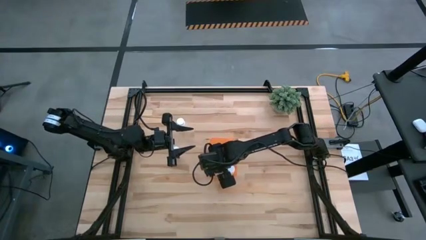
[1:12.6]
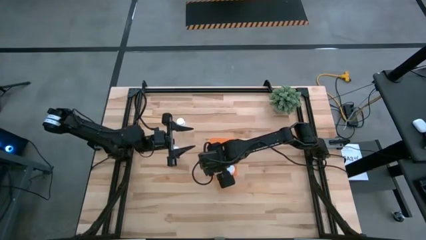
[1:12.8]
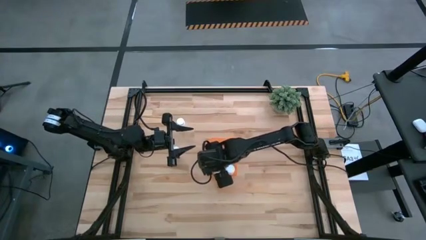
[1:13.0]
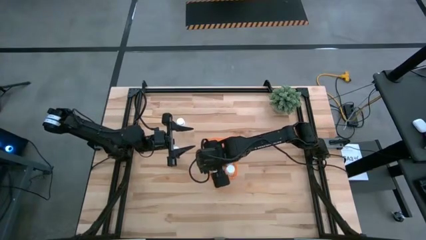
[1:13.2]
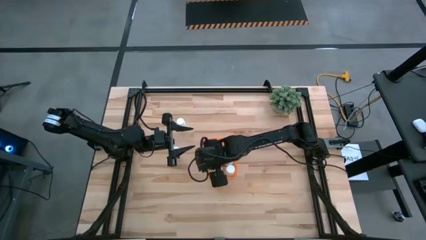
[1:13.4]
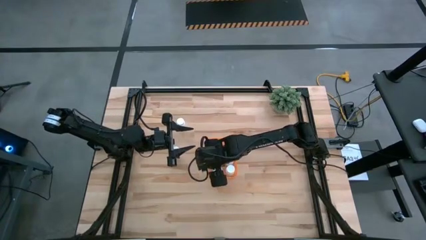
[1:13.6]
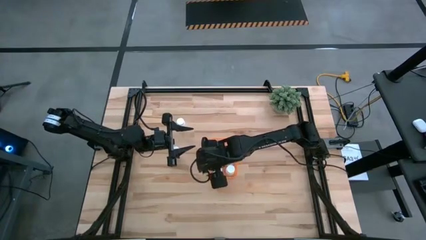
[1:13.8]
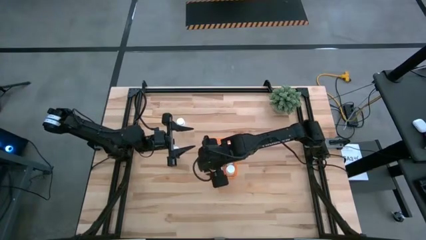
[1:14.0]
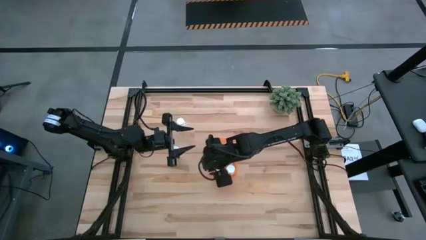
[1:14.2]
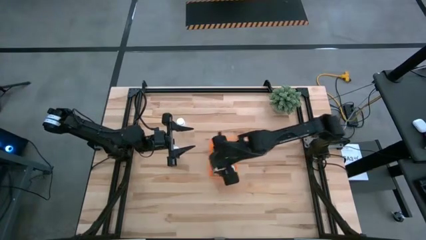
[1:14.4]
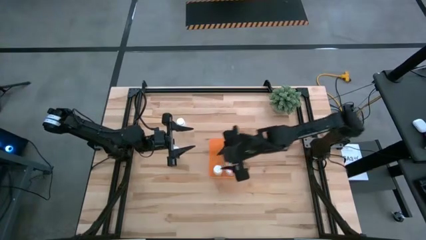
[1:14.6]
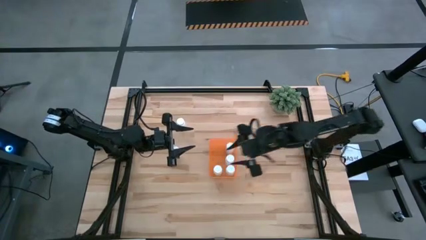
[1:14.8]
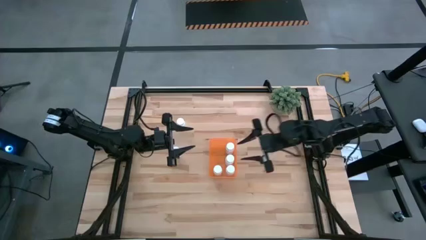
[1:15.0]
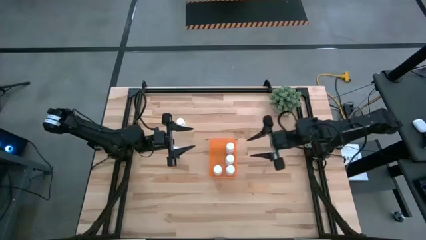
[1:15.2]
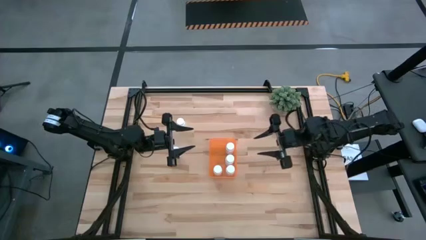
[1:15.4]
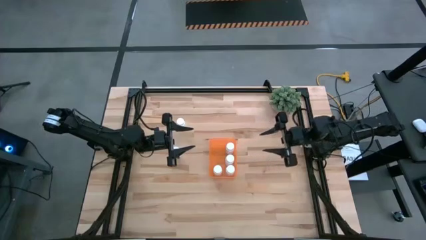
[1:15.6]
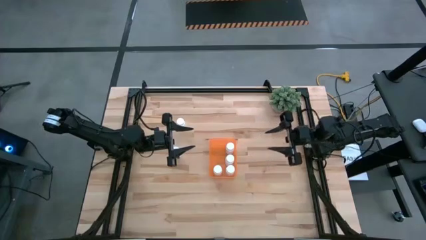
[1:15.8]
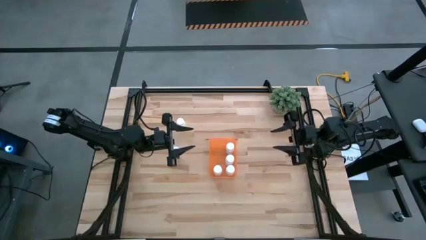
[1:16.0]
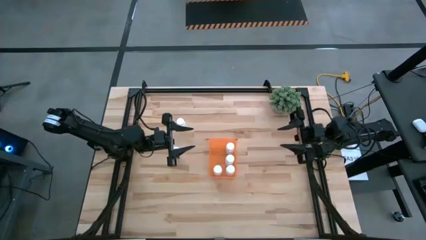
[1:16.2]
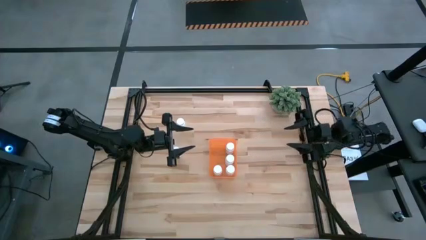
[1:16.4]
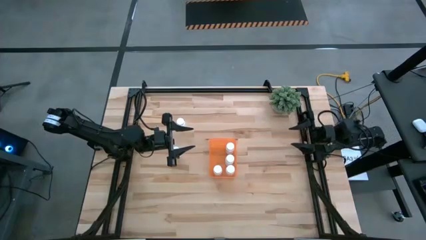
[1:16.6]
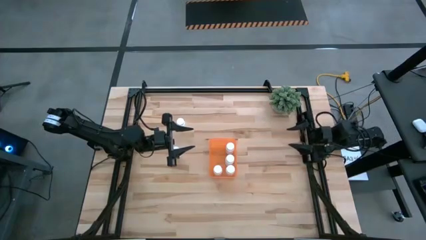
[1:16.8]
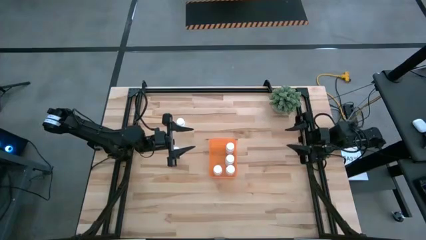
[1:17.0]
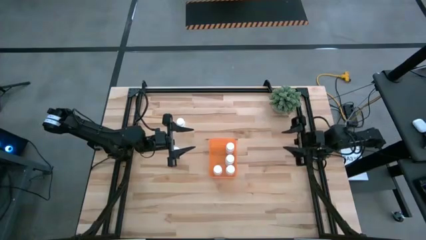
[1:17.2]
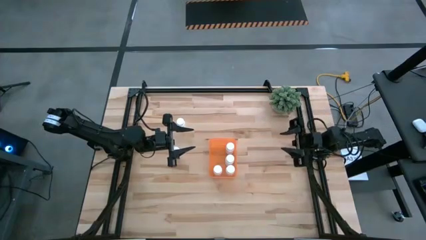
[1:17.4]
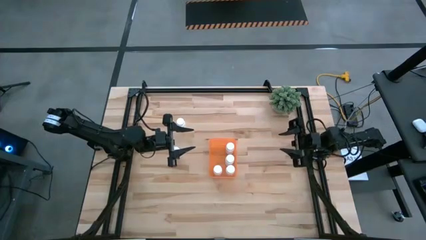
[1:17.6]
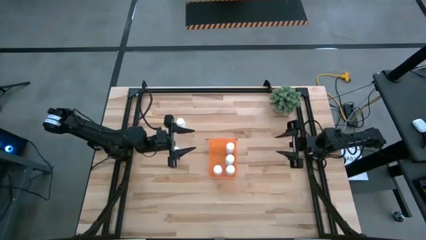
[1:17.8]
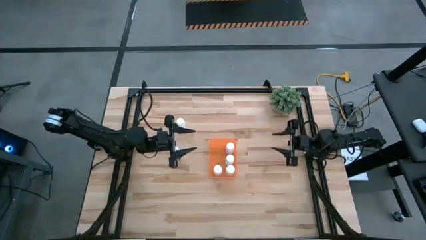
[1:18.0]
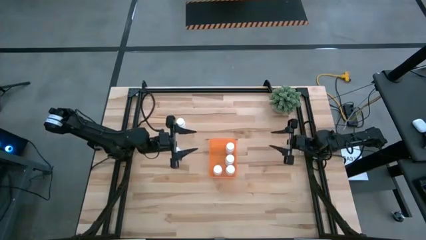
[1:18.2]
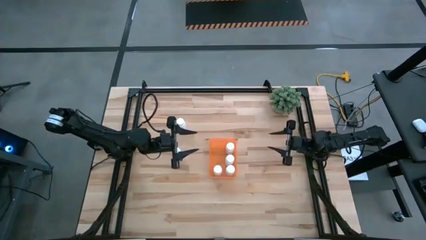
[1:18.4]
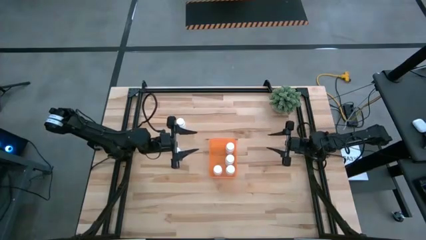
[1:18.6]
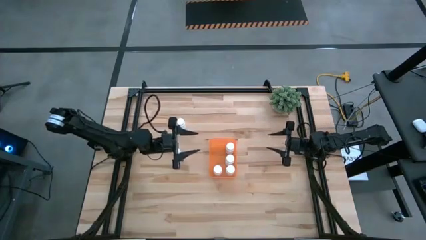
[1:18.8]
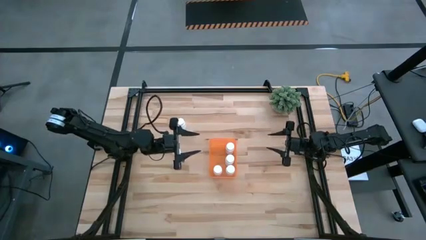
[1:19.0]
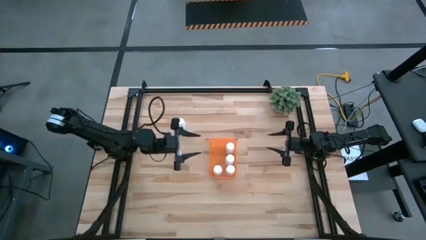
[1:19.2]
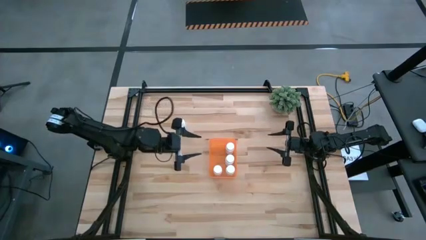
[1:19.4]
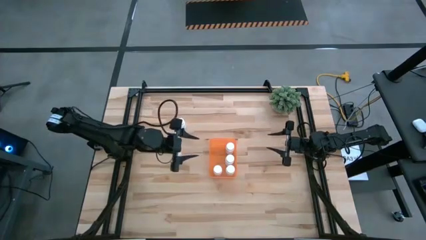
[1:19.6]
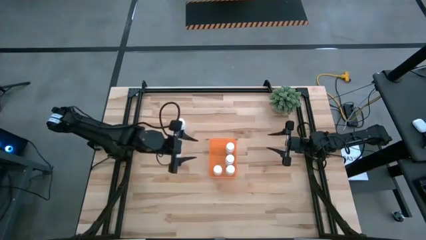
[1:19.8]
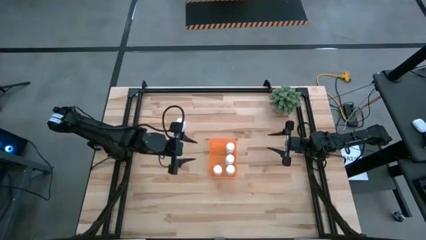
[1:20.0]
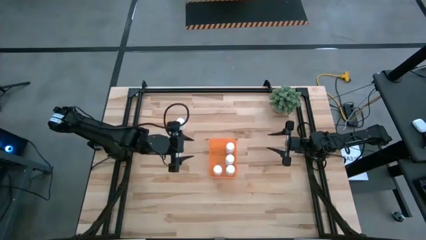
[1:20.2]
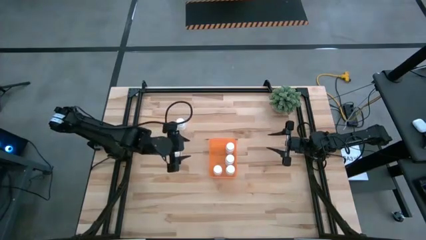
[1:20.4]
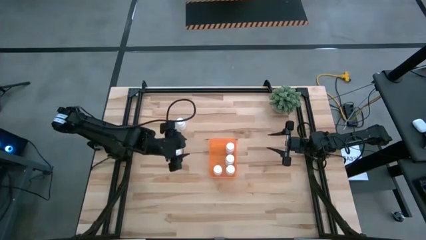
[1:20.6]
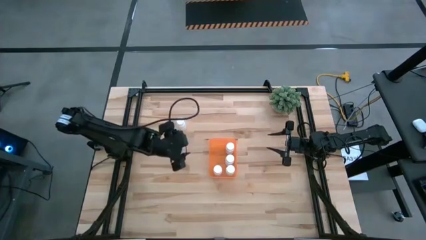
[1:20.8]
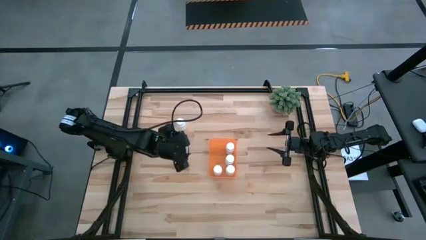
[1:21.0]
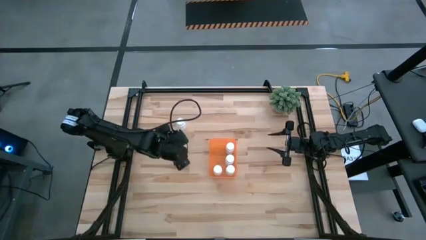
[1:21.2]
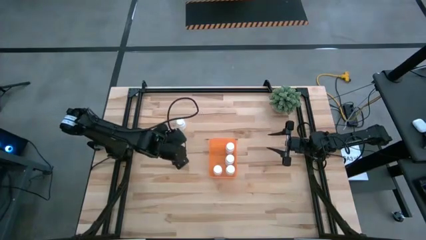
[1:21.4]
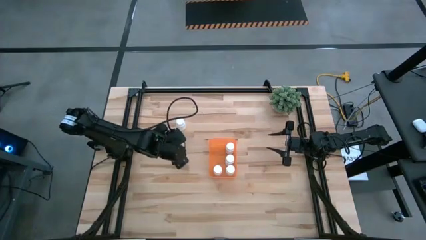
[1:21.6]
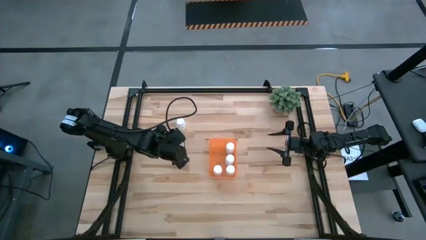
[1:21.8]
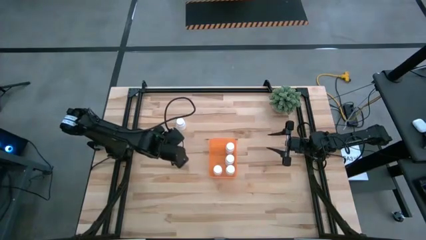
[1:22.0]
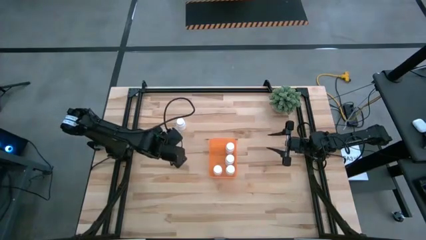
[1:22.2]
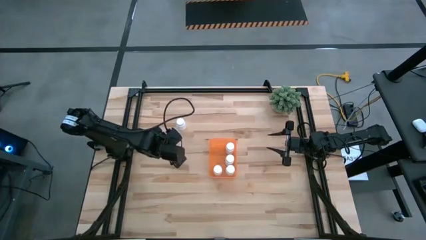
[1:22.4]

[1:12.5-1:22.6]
Task: Pick and place pill bottles into a basket
Put the white pill bottle into the orange bin

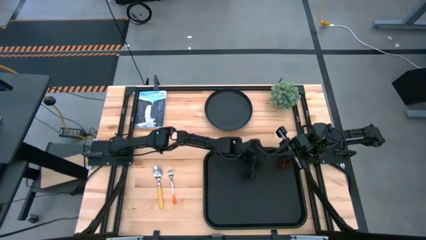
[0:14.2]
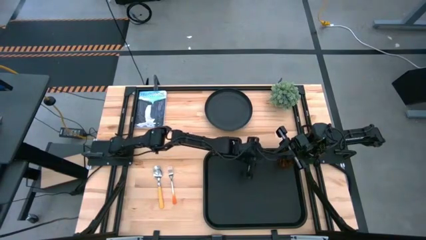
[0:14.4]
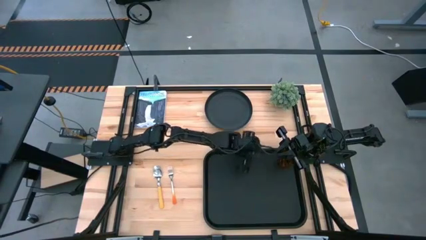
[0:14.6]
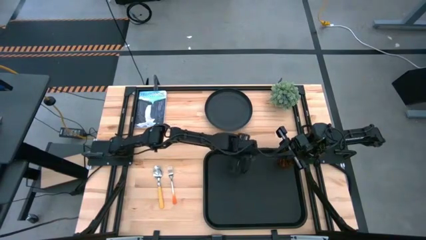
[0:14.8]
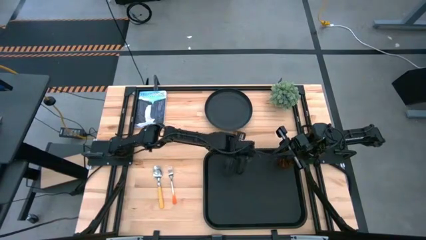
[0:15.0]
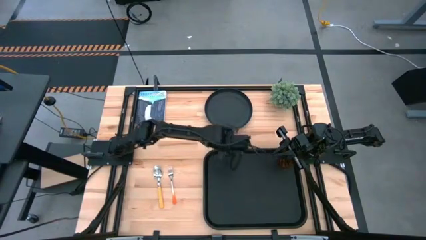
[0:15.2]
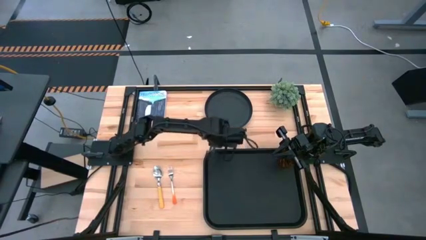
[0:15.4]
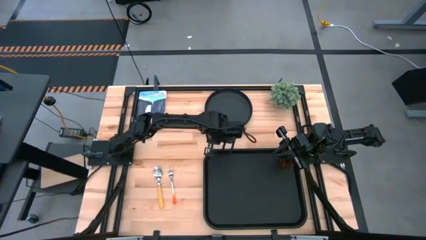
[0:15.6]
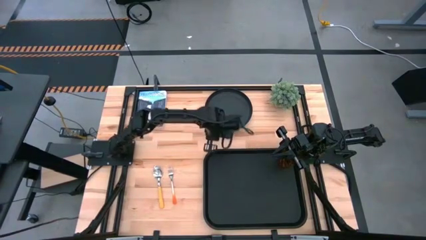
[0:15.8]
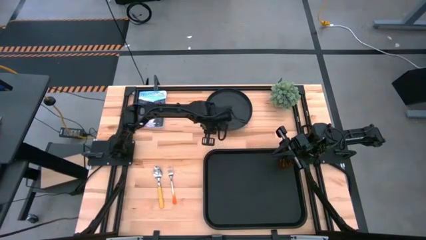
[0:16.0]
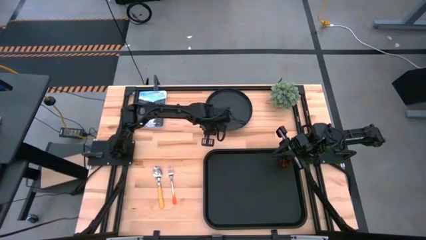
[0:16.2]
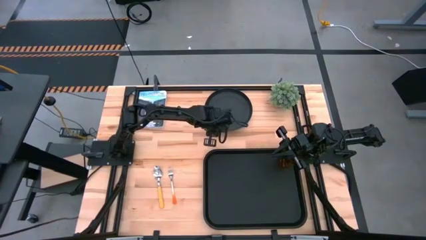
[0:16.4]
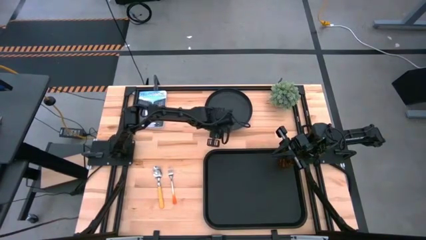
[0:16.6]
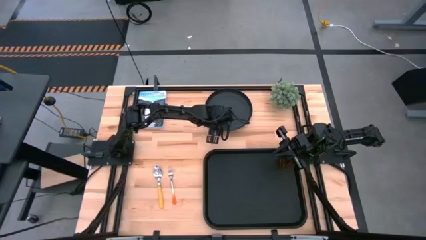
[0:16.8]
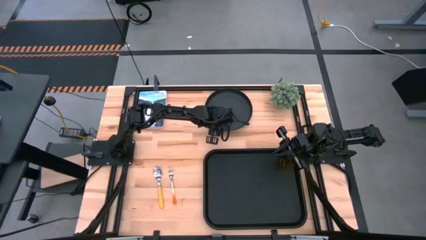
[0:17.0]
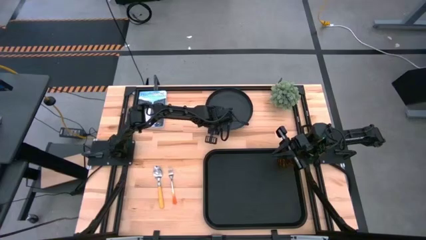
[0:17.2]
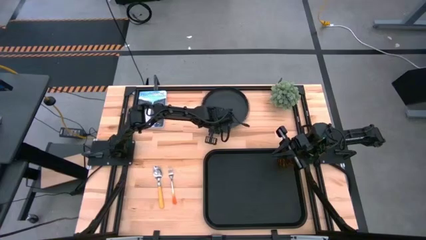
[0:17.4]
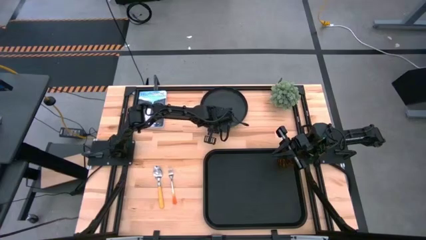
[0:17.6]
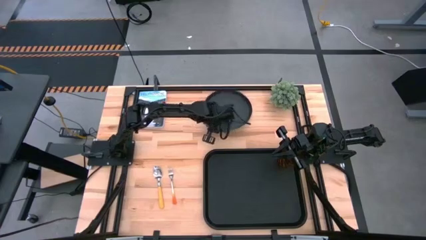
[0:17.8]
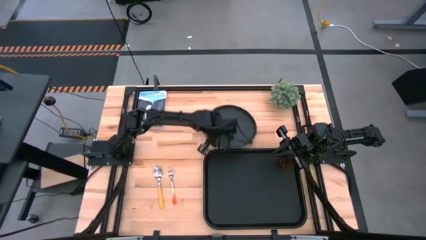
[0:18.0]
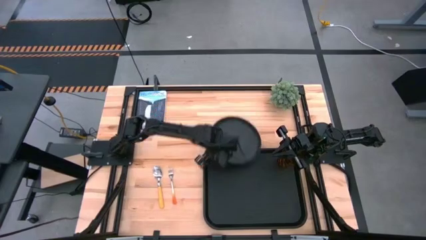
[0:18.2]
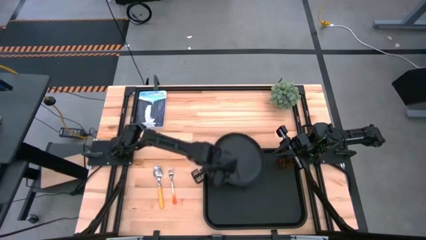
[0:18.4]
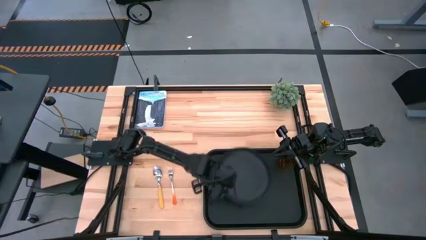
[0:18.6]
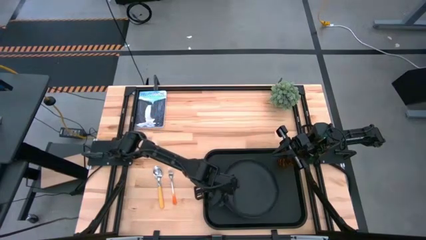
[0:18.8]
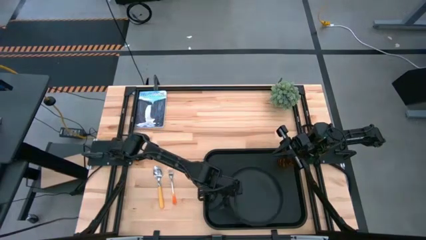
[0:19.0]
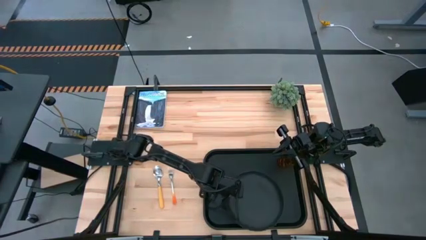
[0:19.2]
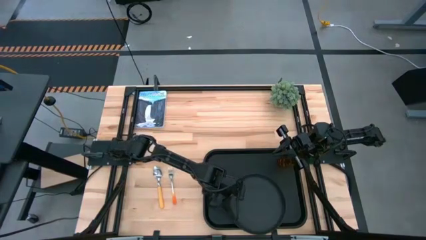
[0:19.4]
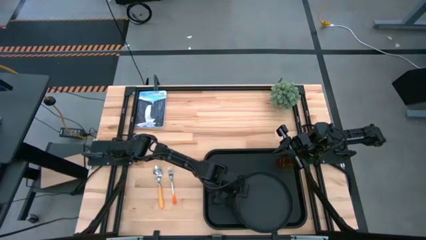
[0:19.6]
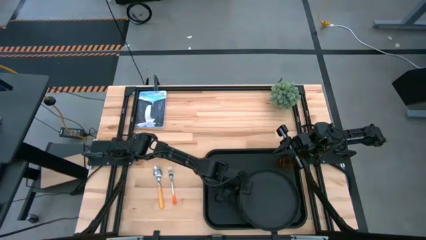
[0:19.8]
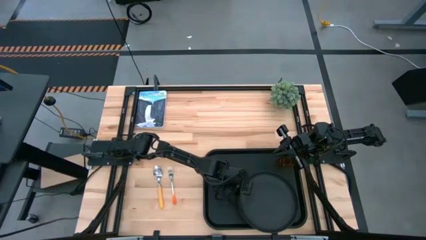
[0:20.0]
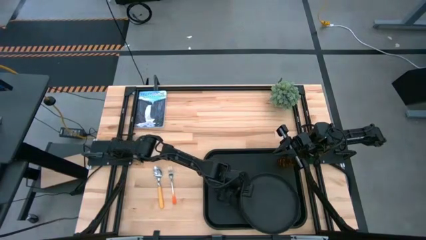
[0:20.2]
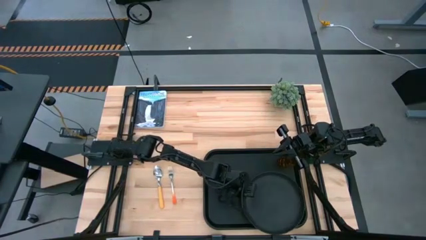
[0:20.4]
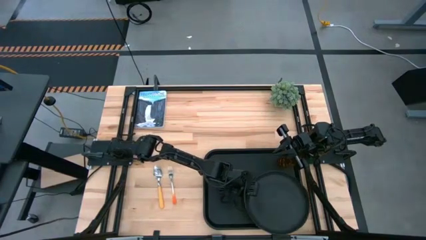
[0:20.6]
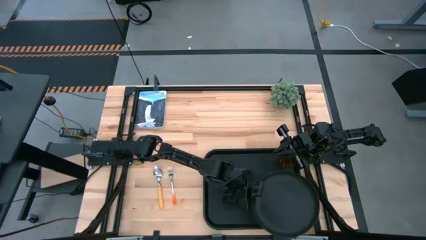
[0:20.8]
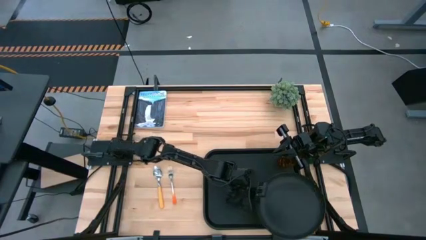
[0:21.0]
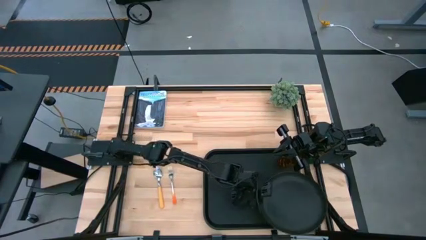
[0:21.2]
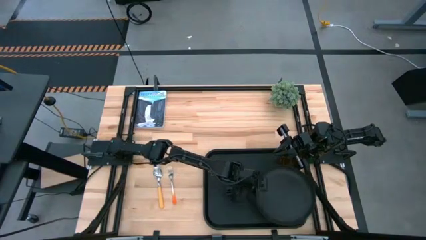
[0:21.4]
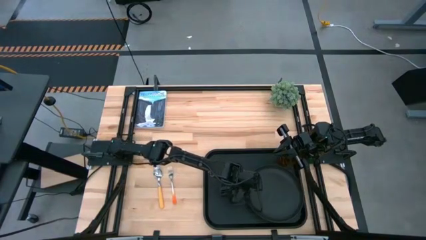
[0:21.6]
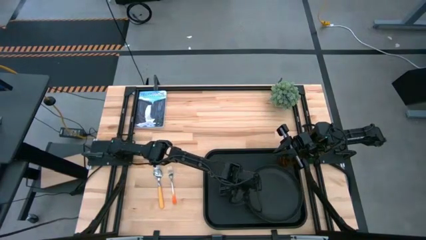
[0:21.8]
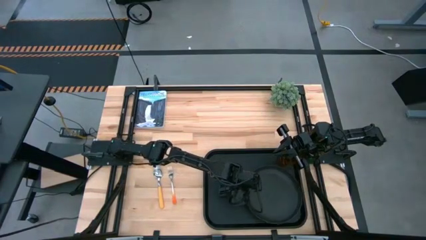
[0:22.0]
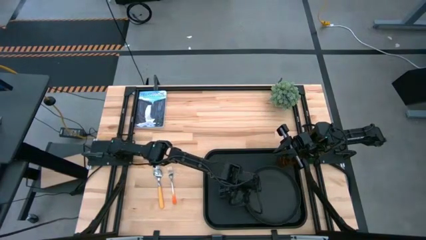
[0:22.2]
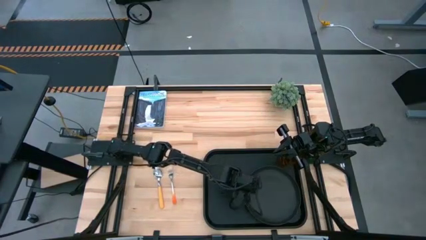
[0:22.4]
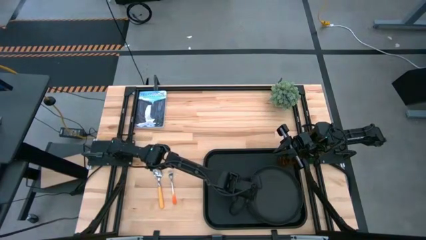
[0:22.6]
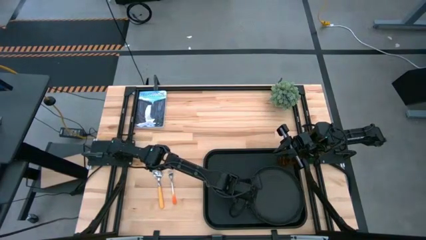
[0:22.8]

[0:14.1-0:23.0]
Task: Pick and place plate/cup/fork/spoon on tray
Put the black plate on the black tray to the bottom left of the brown cup
